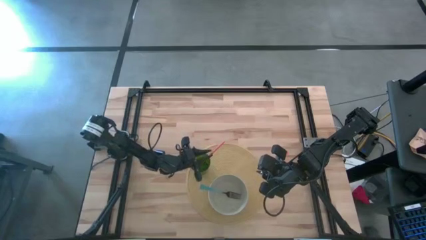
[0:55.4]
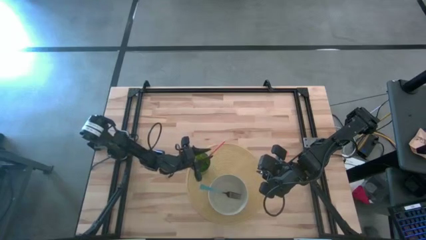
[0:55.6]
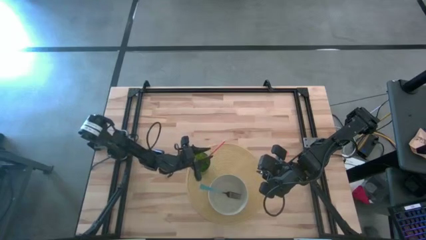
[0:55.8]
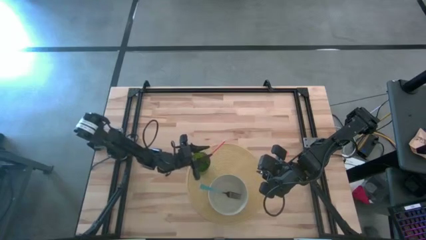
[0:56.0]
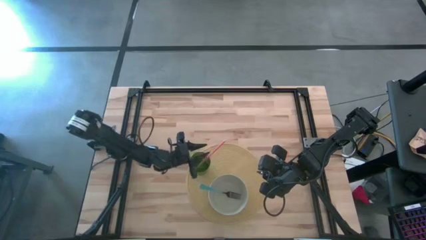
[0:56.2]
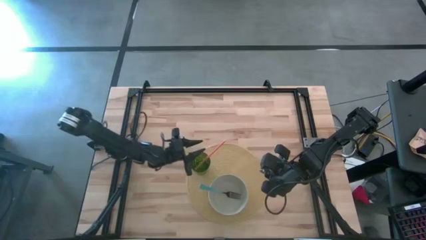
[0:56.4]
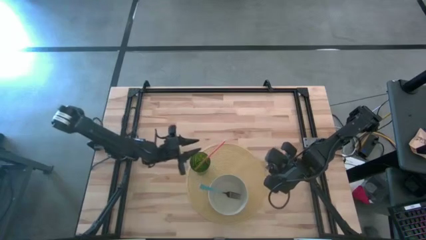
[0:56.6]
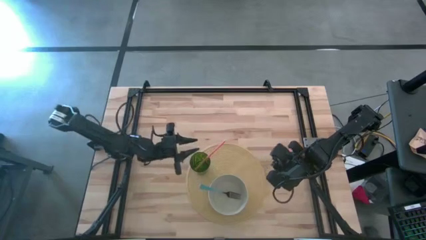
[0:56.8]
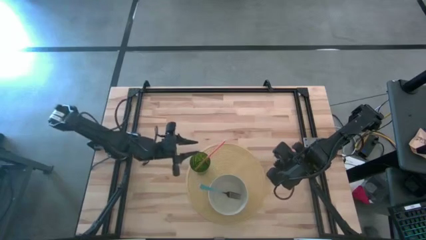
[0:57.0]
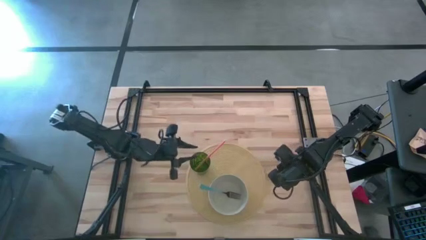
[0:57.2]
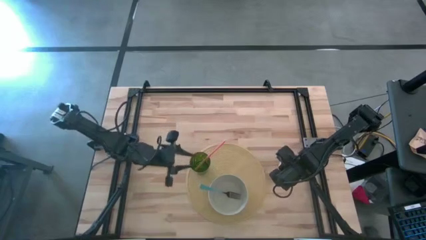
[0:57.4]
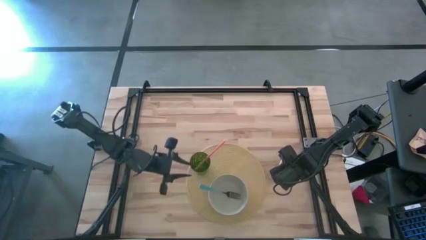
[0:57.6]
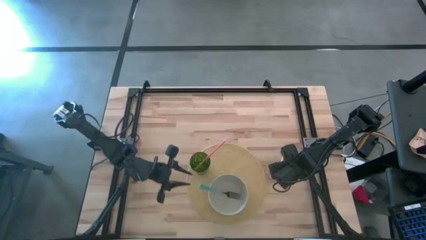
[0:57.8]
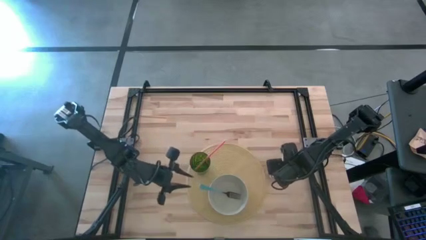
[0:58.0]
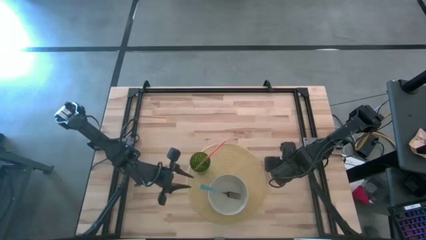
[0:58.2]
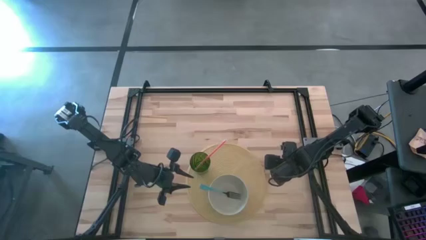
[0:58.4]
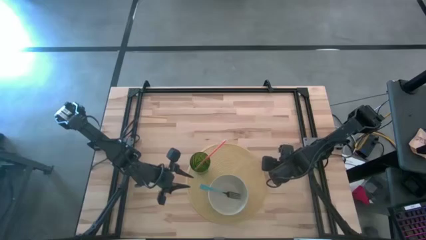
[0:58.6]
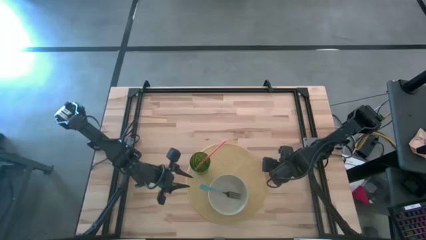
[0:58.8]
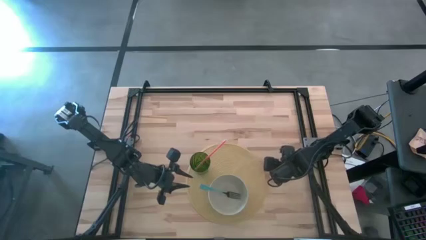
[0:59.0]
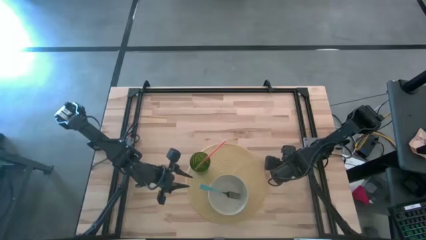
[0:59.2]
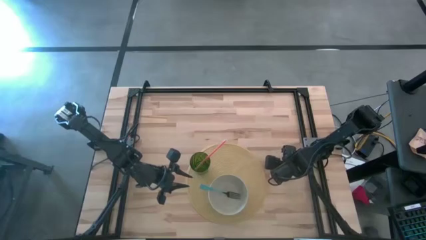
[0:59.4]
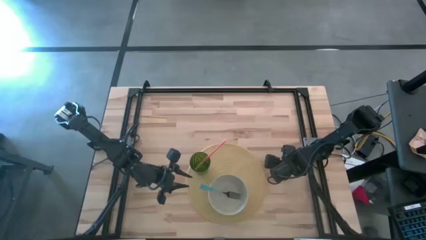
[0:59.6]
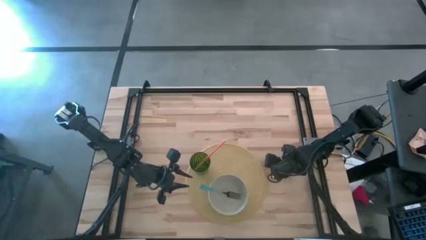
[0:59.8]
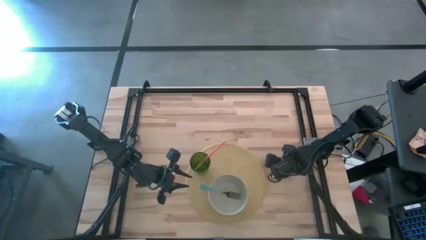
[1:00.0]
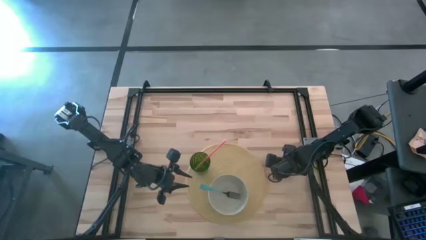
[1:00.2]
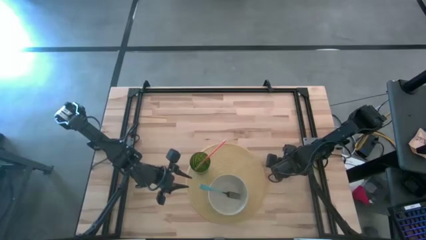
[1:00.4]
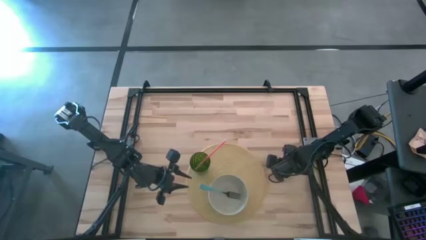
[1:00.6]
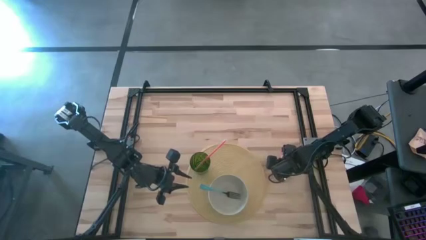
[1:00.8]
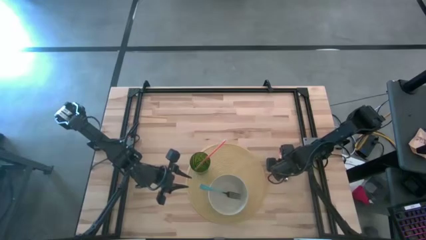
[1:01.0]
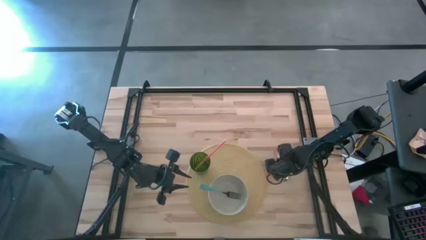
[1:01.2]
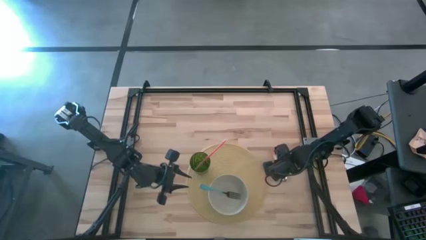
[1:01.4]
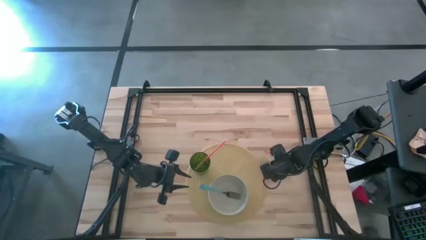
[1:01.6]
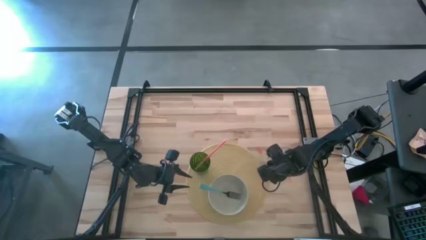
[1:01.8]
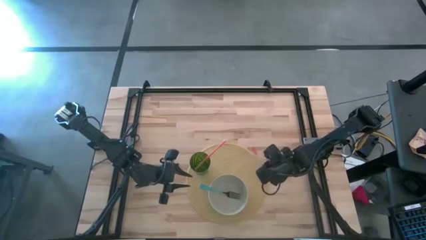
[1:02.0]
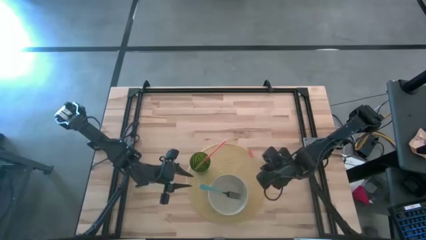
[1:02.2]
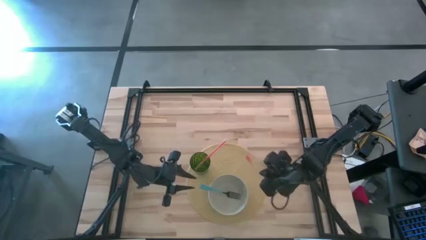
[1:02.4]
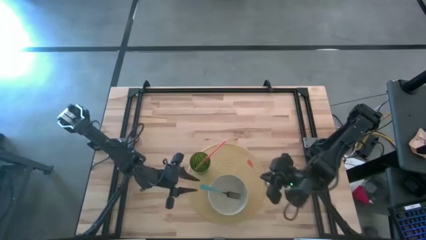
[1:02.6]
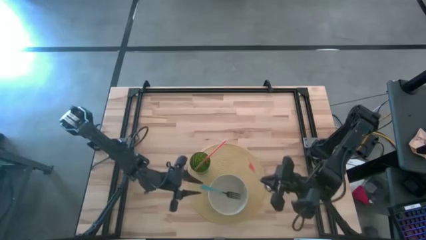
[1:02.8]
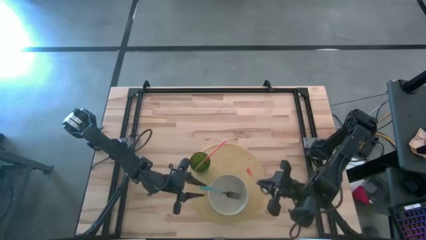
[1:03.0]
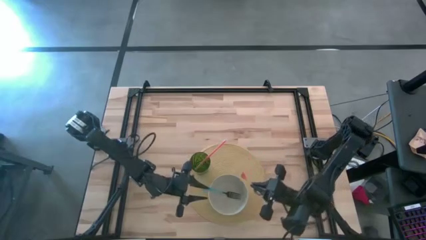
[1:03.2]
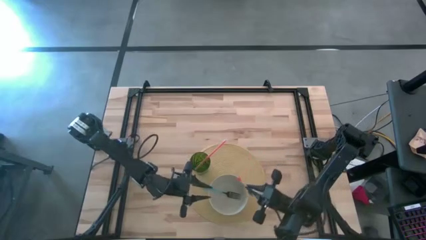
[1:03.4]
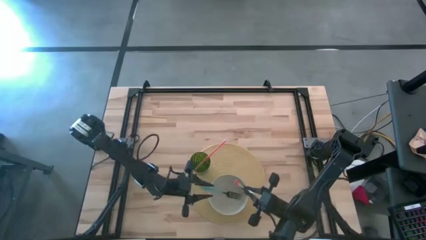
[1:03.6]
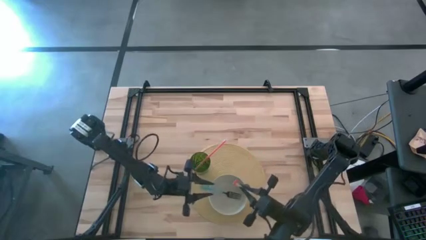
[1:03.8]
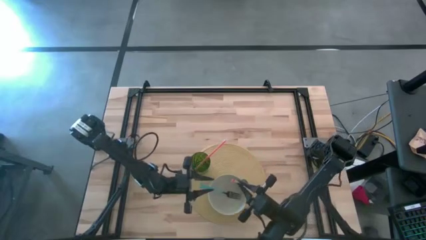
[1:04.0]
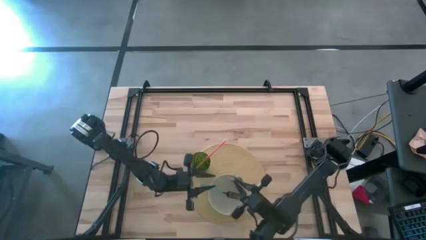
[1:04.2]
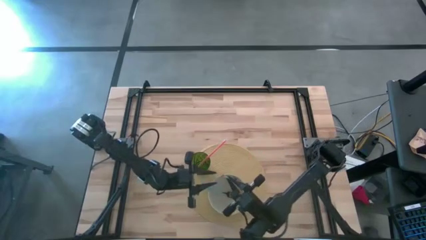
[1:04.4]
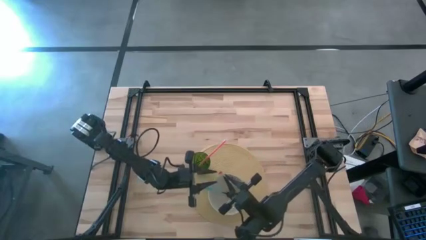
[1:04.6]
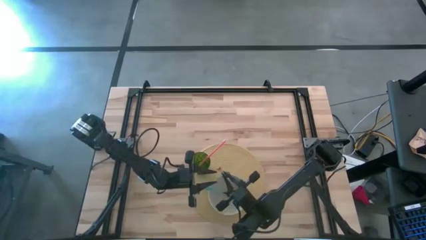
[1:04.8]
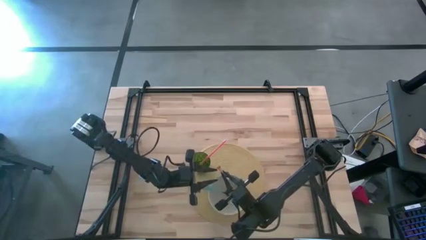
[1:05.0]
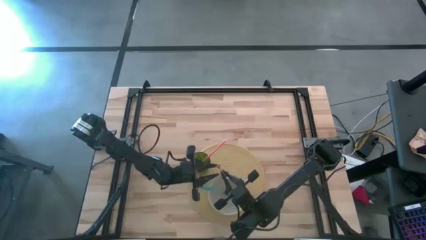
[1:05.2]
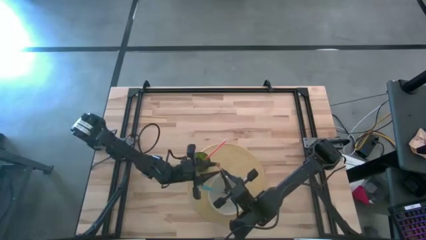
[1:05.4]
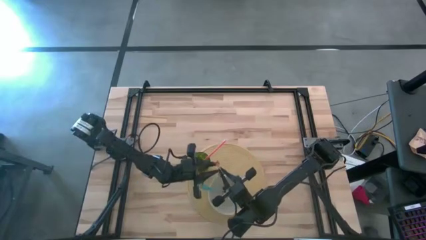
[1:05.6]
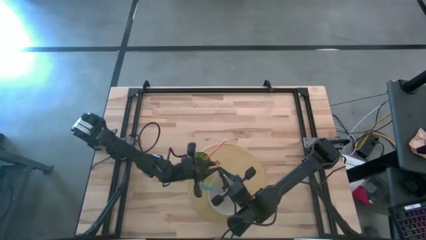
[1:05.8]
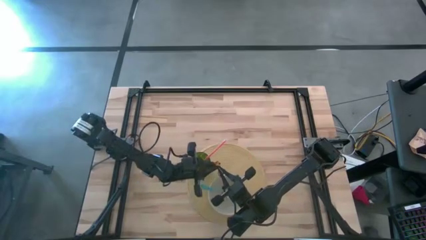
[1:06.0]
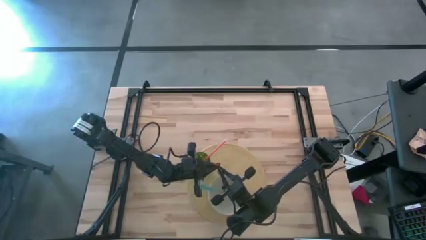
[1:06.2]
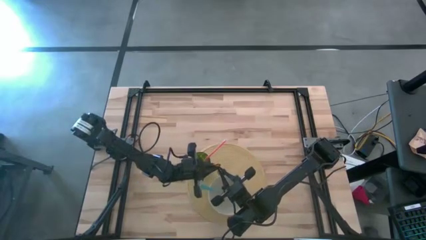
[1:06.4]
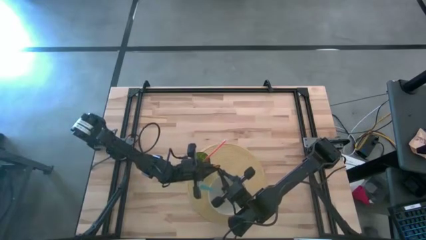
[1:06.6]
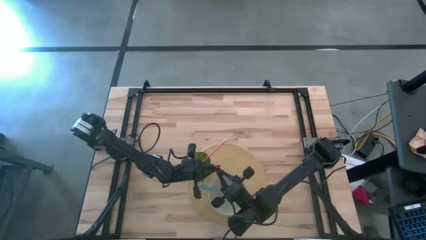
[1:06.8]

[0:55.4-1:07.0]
Task: Pick & Place Utensil
Put the orange spoon into the white bowl on the brown mat
